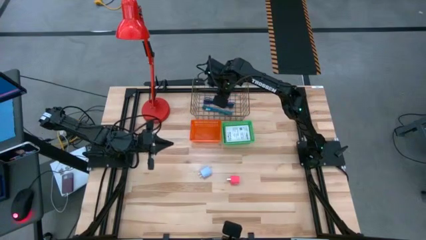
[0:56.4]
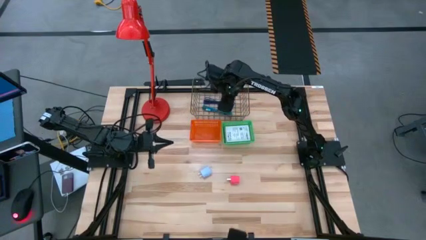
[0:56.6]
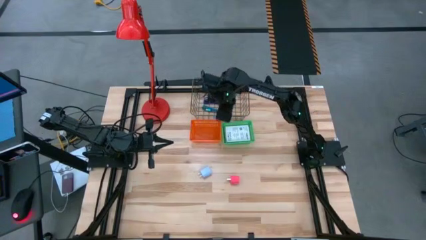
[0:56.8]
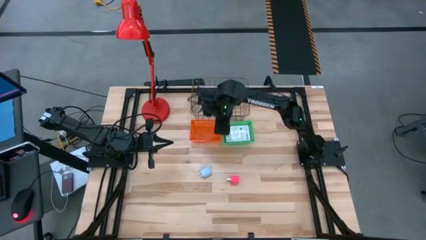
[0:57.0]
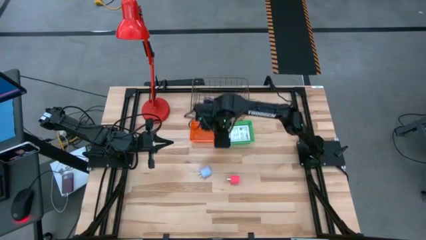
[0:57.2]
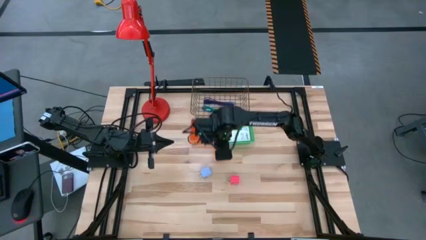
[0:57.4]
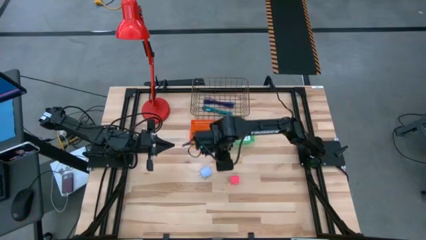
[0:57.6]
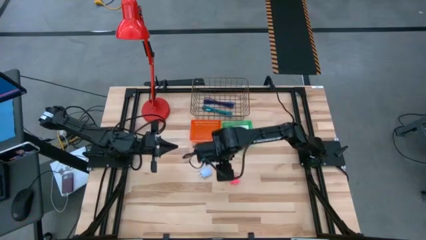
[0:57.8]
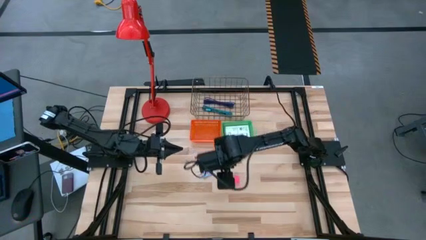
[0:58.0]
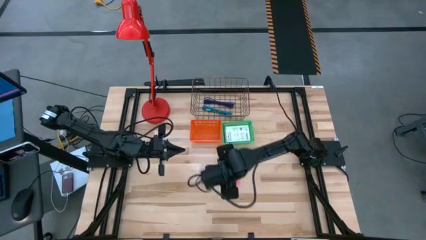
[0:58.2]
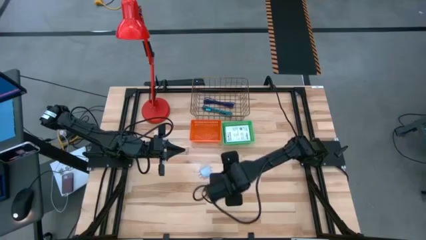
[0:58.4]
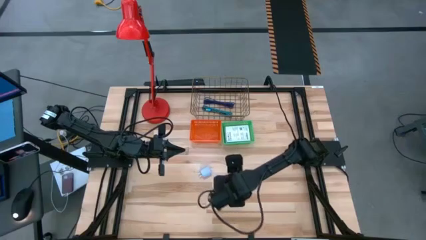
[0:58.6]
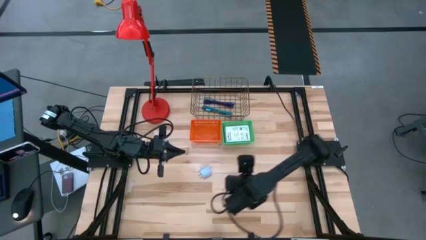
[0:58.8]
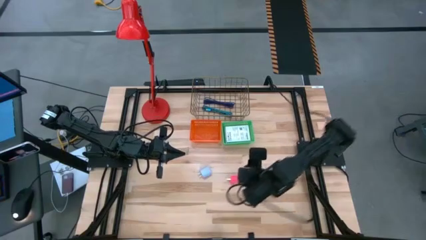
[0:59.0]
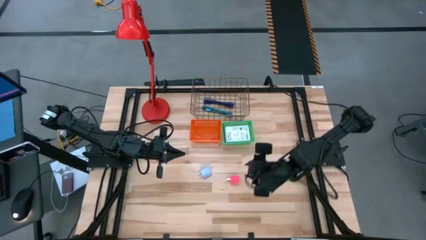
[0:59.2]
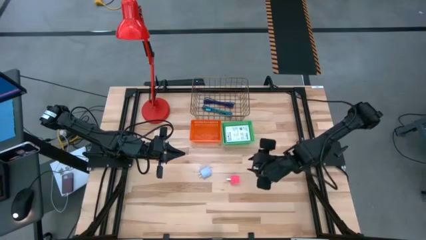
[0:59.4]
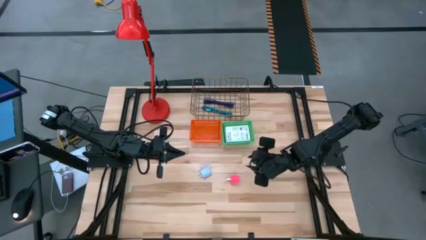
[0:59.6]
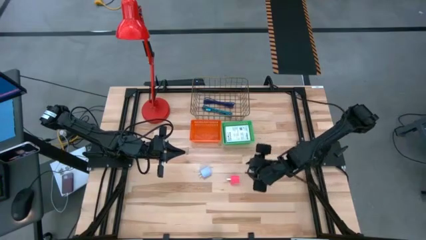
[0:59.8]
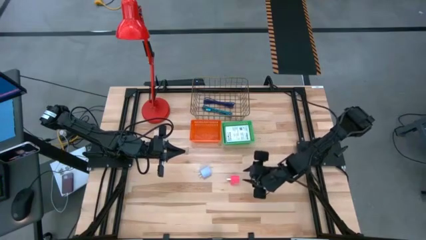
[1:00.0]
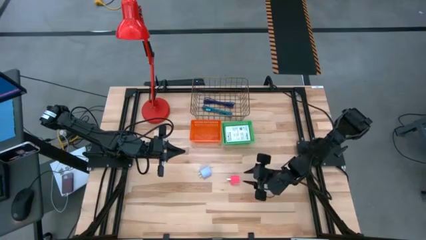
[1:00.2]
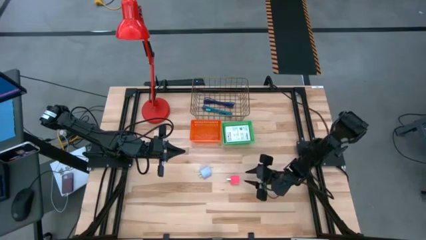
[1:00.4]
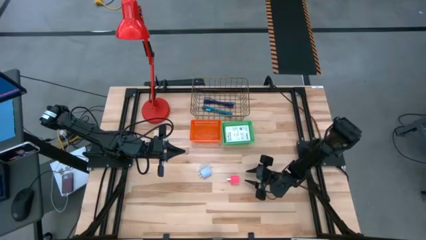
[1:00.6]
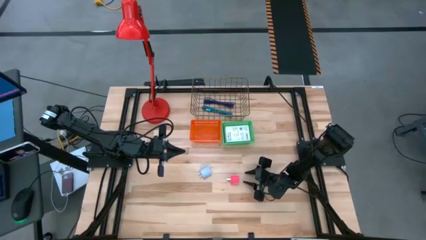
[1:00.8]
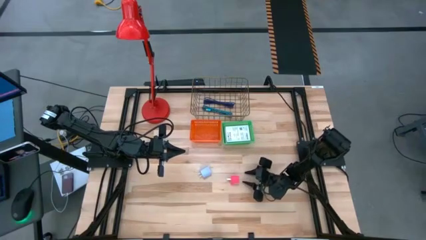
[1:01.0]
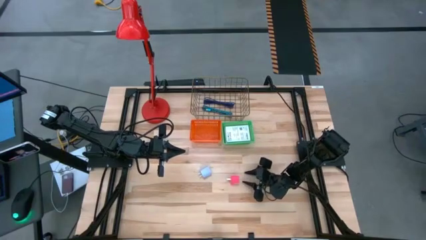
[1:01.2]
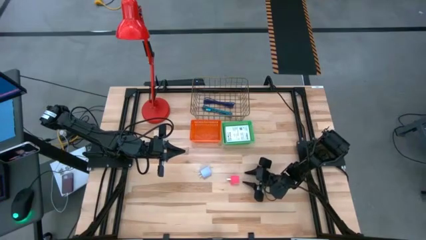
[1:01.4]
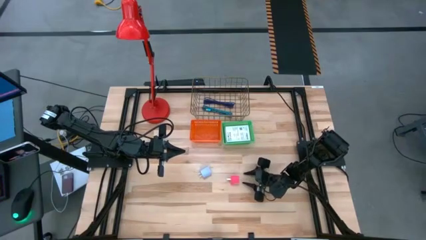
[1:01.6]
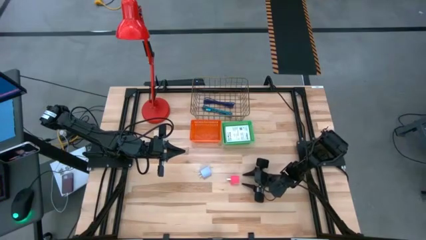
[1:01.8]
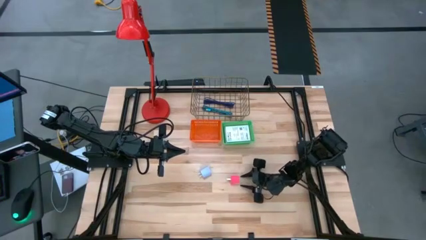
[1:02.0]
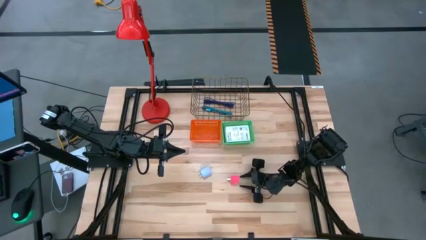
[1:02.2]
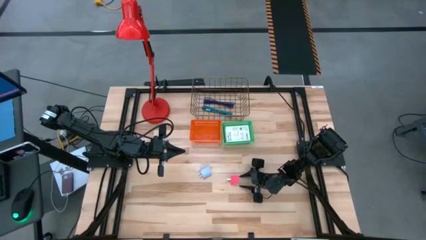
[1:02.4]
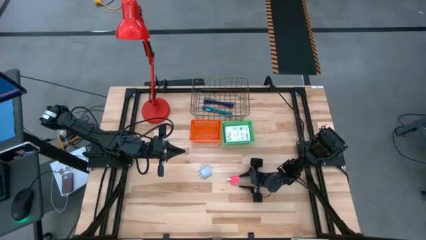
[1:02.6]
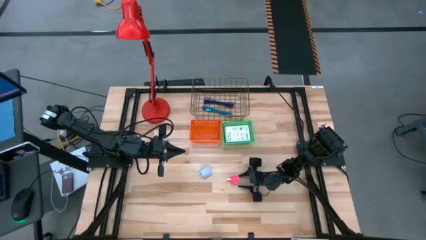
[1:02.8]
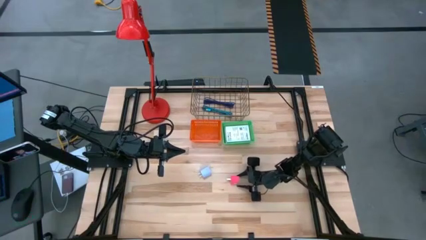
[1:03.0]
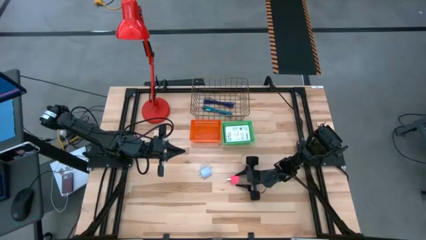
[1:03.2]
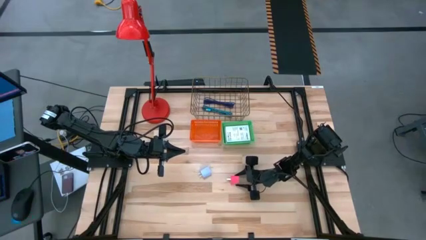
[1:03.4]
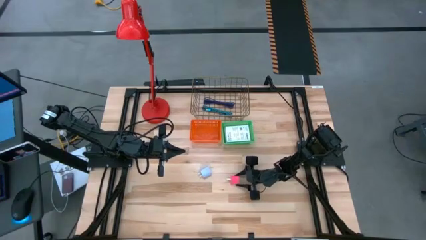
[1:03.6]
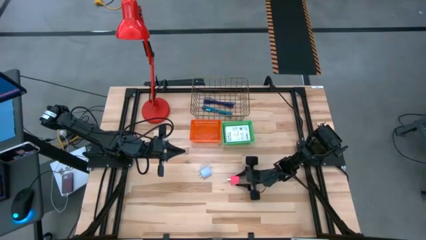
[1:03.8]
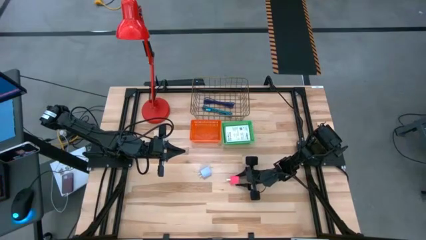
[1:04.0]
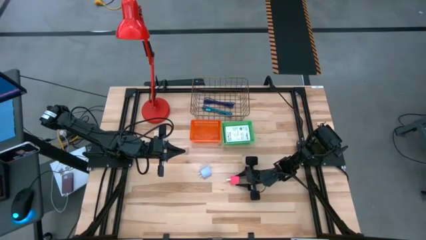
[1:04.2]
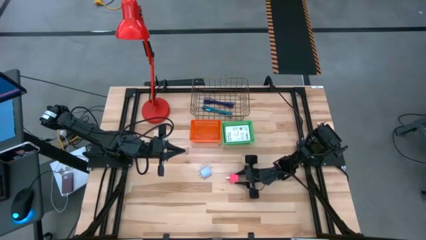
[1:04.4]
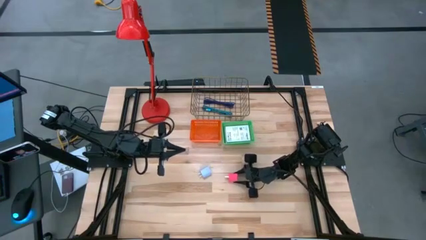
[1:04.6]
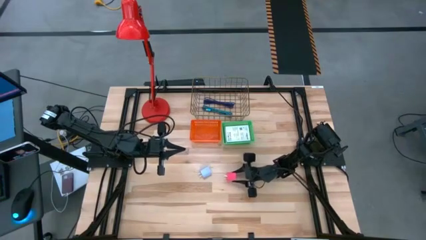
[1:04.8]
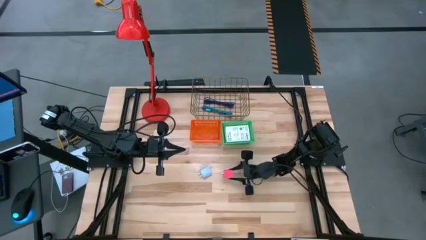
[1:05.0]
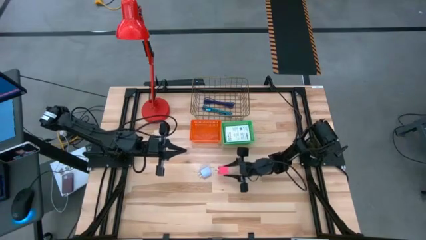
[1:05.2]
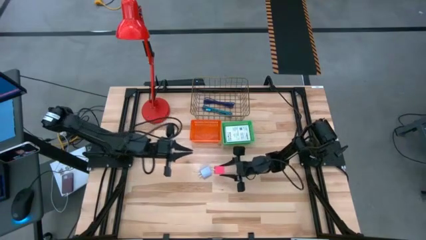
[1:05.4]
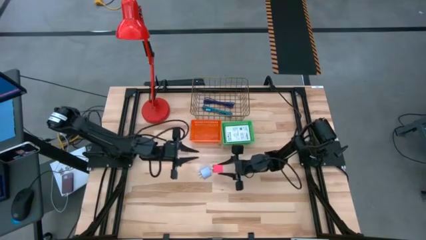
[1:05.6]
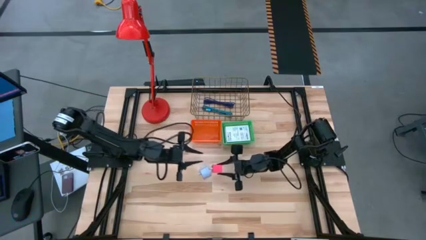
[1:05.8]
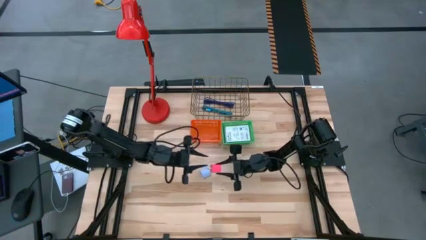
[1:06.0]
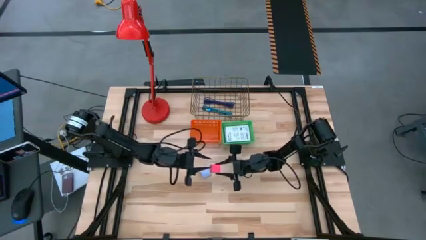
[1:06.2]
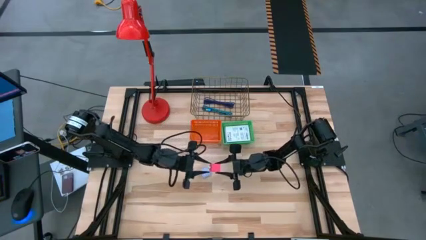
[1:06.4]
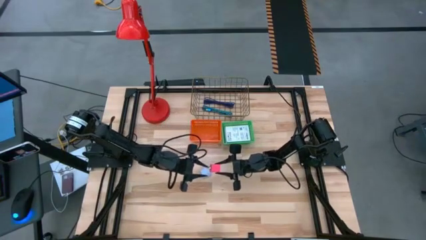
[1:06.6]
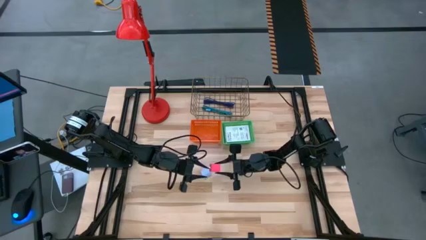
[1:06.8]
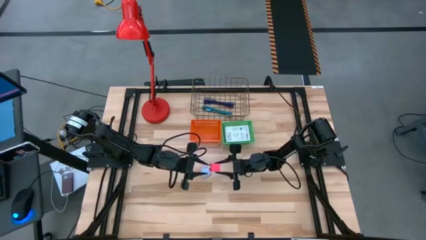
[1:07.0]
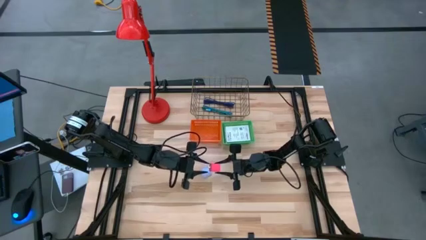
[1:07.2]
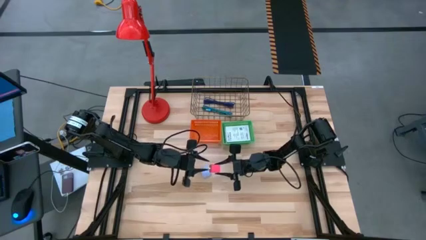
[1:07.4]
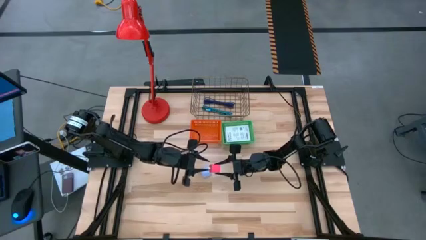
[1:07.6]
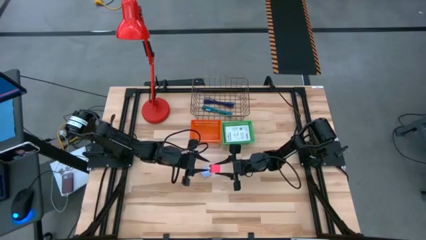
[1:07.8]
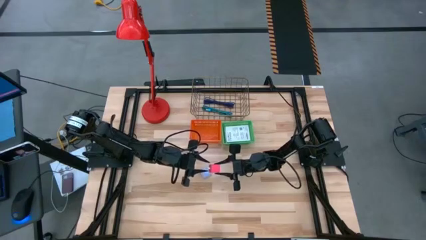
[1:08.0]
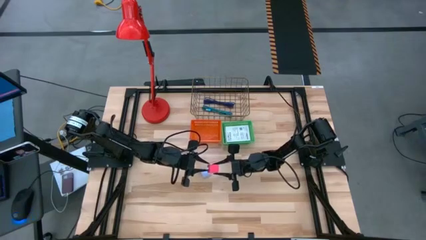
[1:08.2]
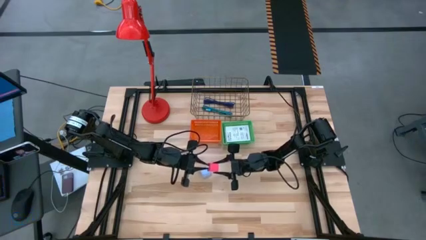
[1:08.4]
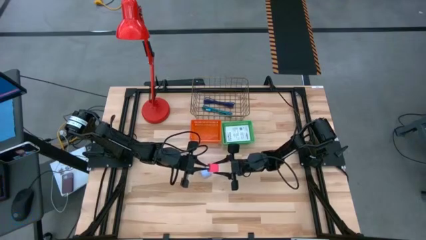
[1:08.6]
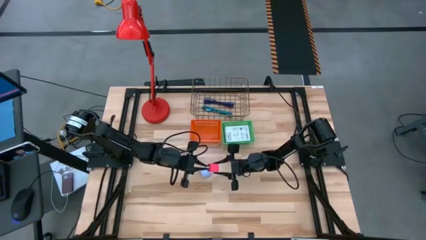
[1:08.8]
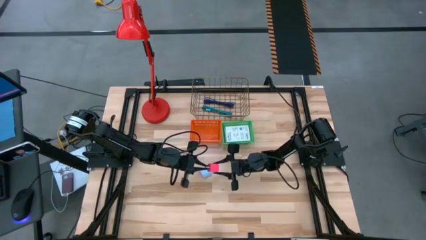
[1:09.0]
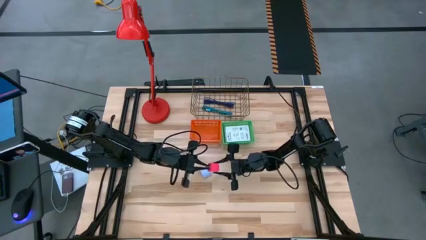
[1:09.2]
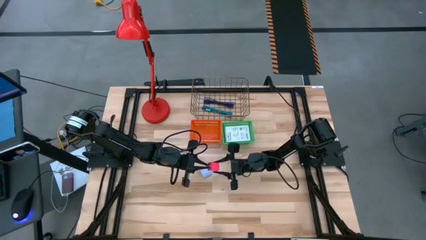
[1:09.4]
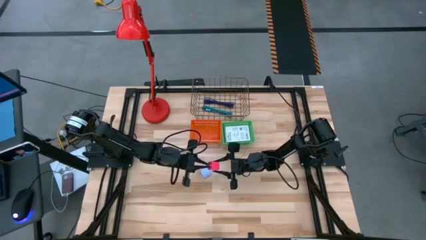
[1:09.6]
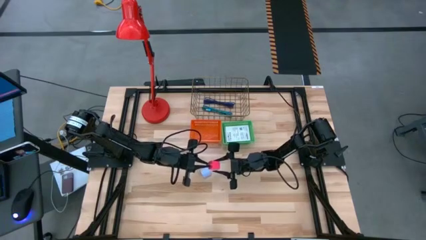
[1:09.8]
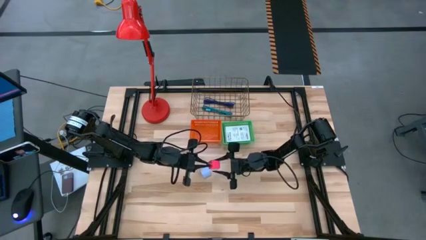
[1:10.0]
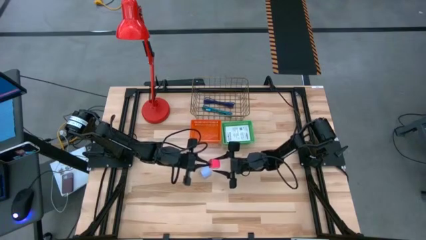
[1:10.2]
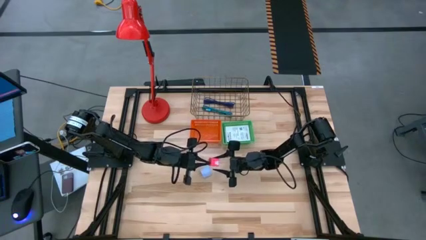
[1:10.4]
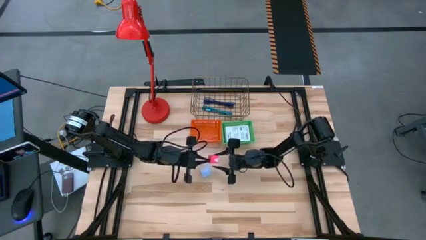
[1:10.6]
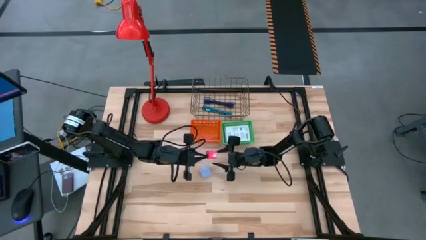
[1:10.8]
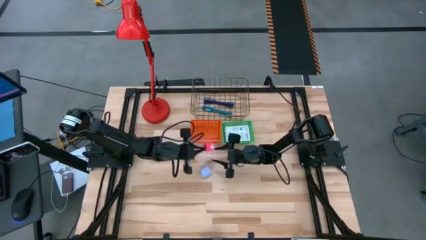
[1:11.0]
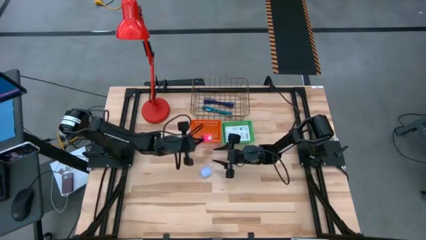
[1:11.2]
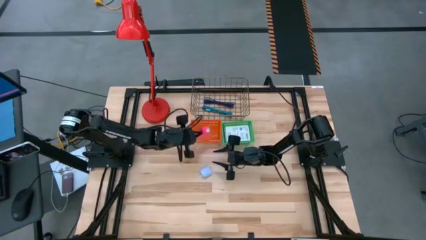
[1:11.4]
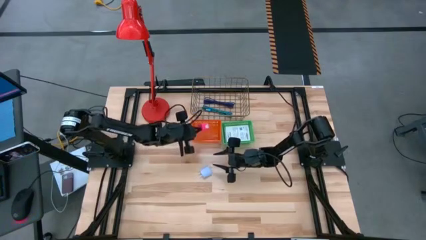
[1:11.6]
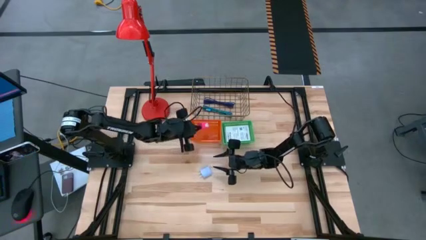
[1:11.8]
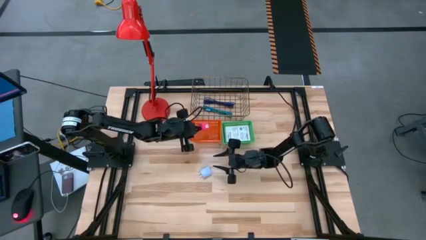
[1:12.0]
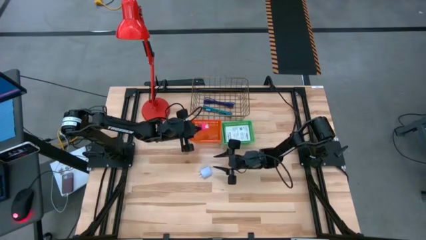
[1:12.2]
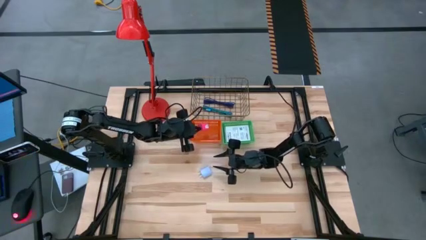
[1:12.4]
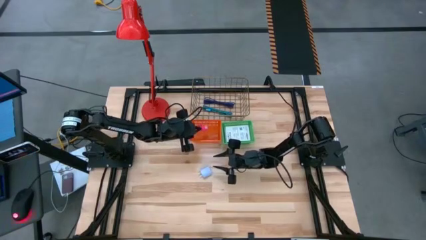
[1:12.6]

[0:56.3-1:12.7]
Task: Pick and place items into bin
Put the pink charger adapter into the orange bin
